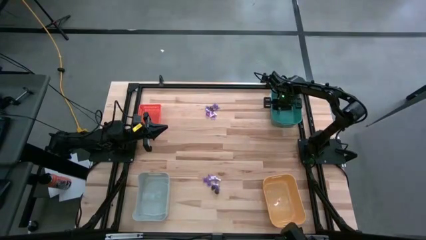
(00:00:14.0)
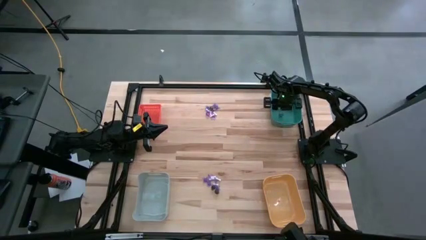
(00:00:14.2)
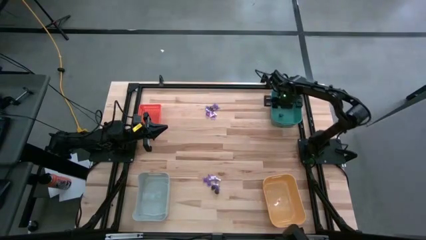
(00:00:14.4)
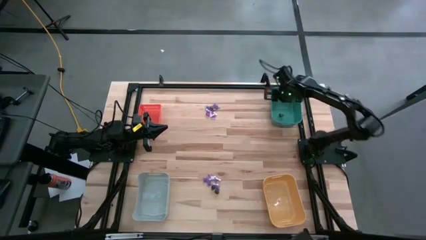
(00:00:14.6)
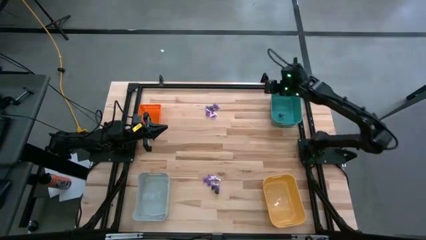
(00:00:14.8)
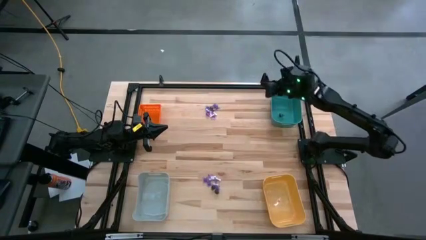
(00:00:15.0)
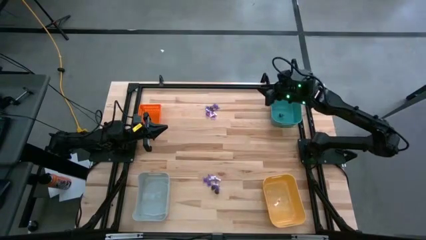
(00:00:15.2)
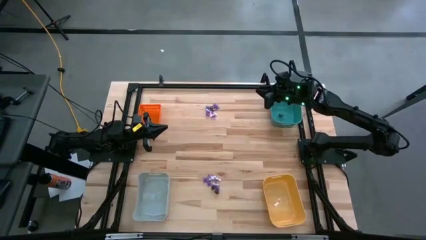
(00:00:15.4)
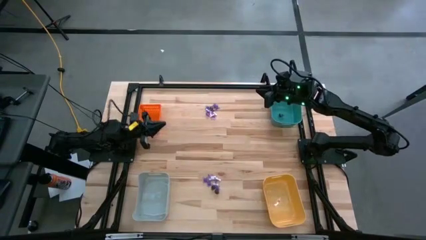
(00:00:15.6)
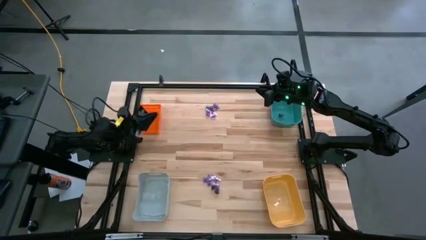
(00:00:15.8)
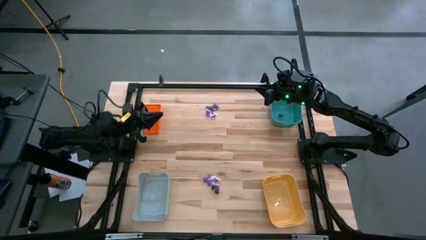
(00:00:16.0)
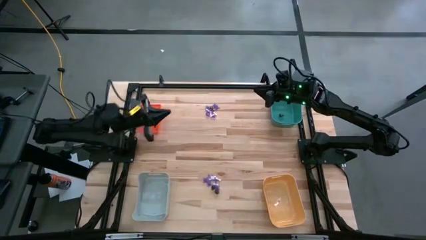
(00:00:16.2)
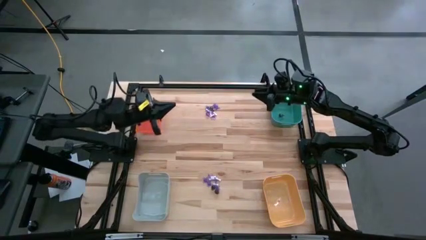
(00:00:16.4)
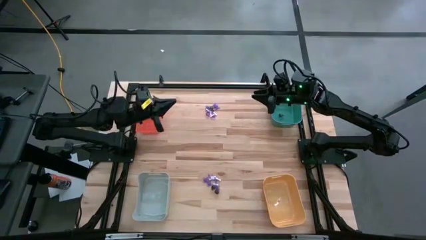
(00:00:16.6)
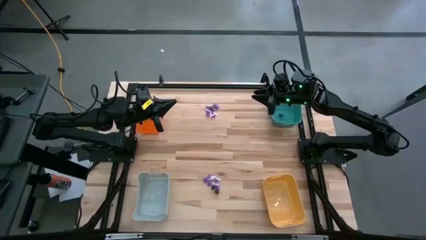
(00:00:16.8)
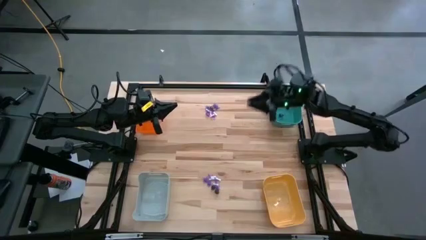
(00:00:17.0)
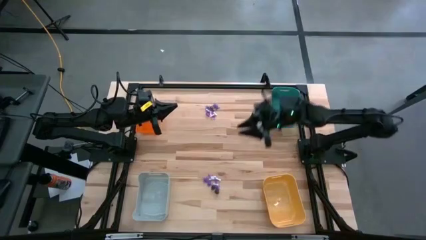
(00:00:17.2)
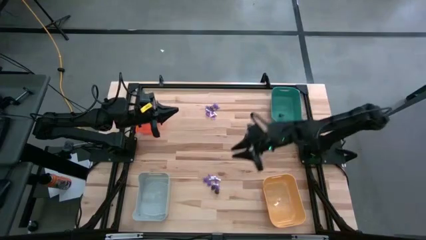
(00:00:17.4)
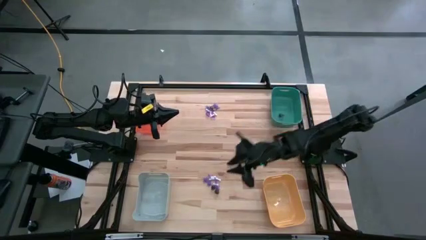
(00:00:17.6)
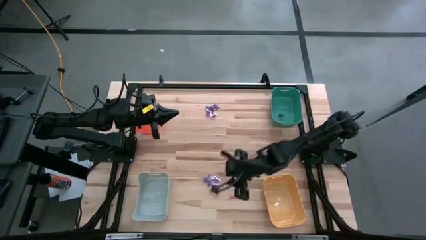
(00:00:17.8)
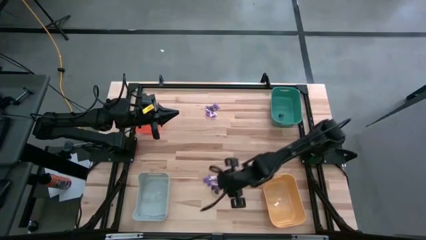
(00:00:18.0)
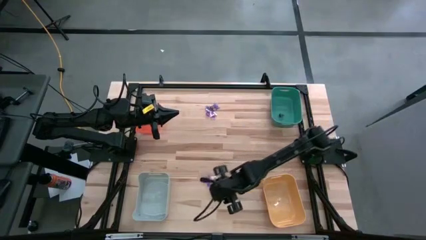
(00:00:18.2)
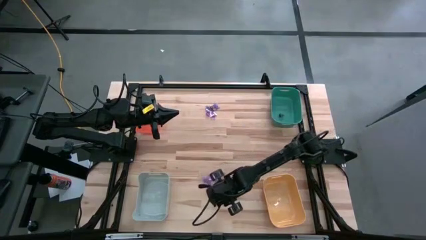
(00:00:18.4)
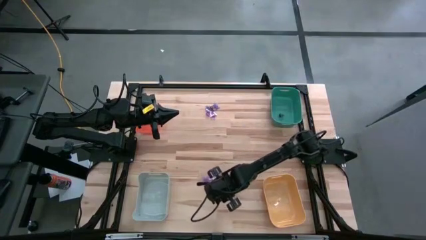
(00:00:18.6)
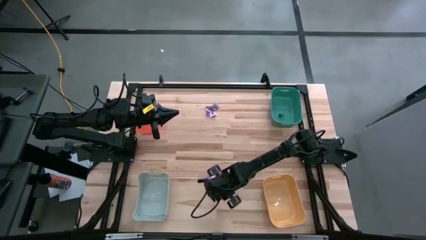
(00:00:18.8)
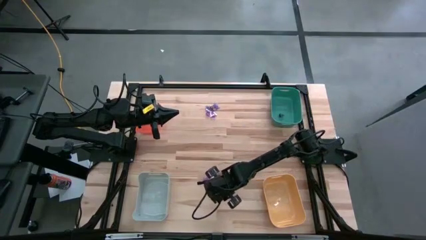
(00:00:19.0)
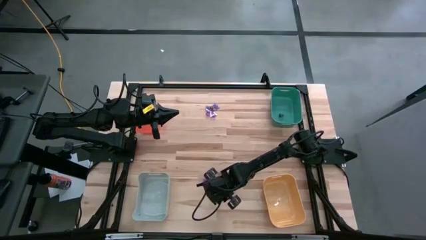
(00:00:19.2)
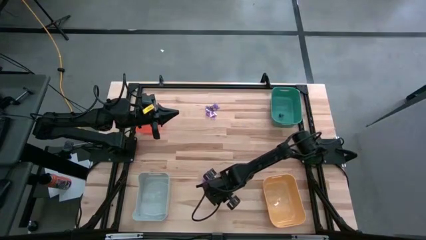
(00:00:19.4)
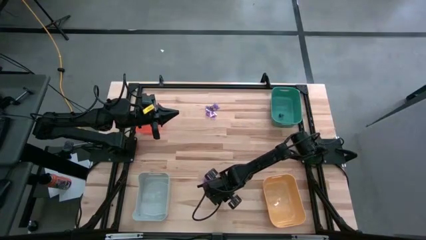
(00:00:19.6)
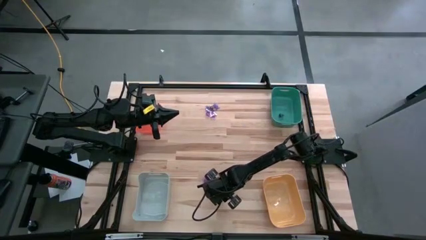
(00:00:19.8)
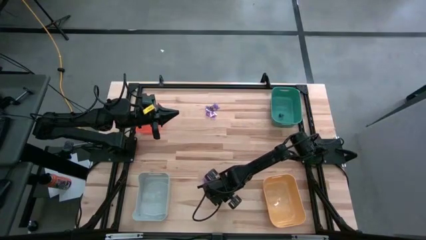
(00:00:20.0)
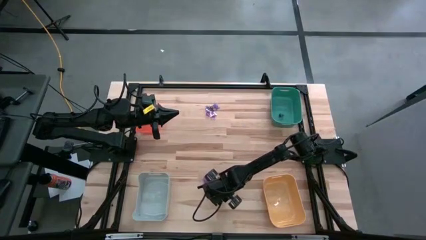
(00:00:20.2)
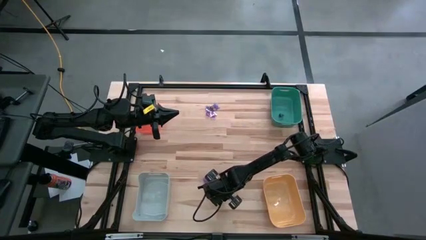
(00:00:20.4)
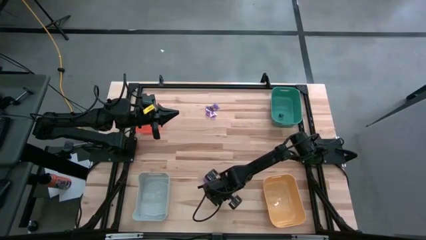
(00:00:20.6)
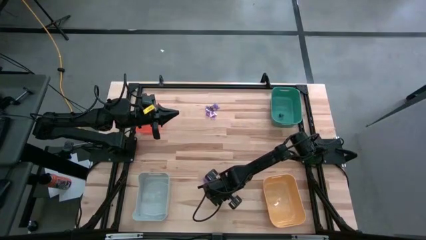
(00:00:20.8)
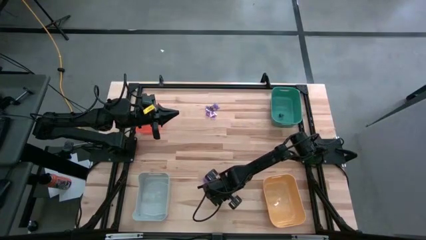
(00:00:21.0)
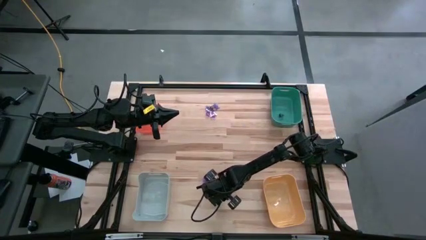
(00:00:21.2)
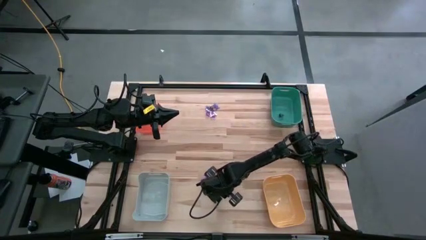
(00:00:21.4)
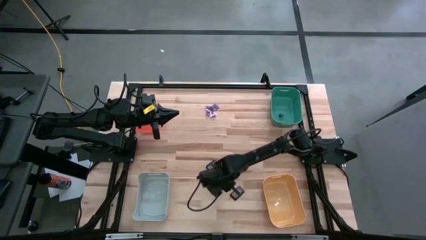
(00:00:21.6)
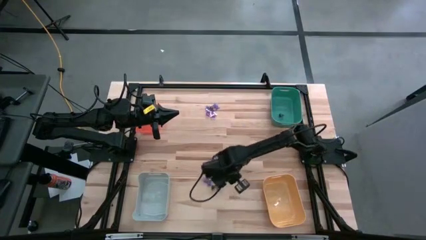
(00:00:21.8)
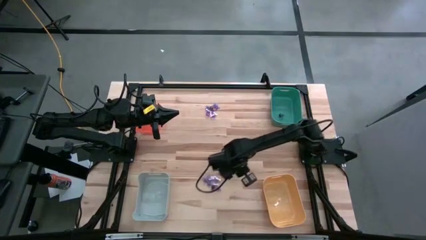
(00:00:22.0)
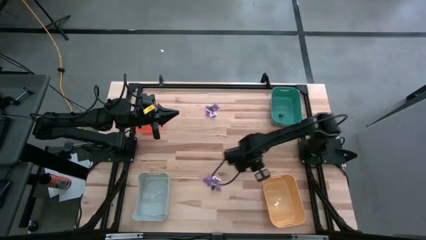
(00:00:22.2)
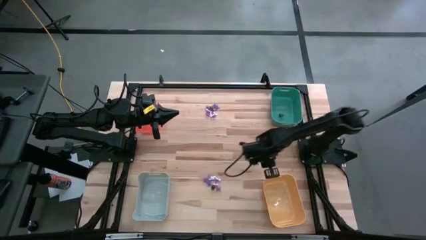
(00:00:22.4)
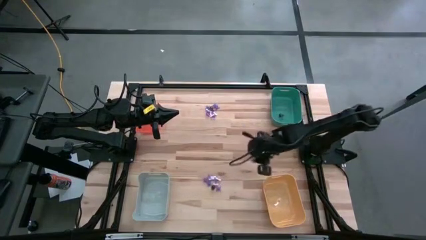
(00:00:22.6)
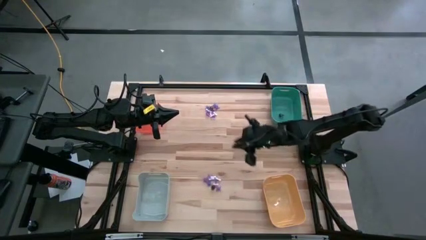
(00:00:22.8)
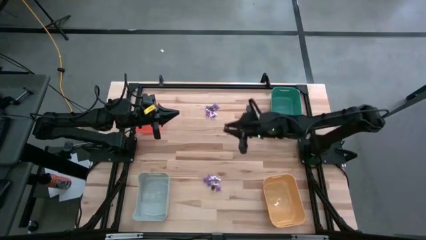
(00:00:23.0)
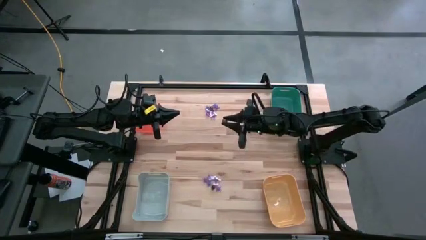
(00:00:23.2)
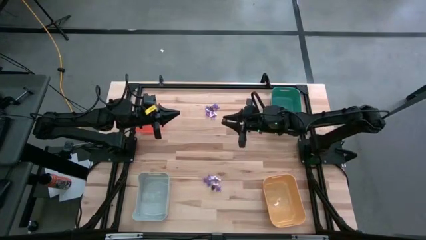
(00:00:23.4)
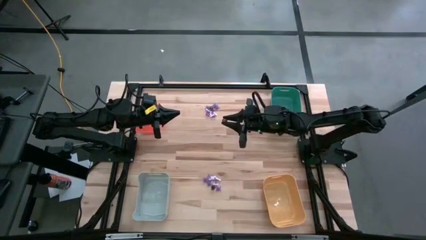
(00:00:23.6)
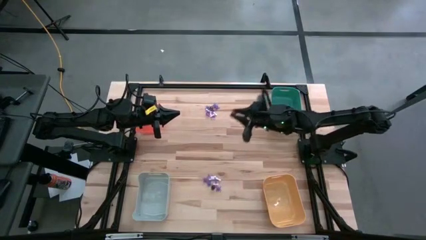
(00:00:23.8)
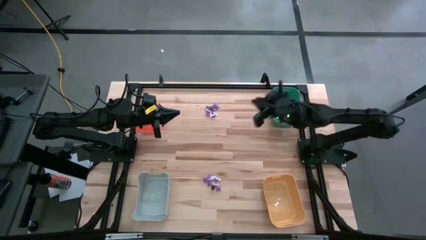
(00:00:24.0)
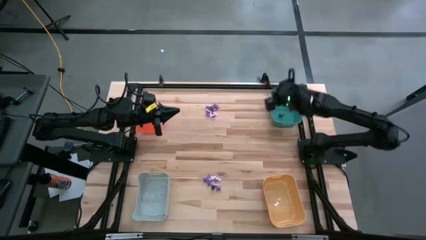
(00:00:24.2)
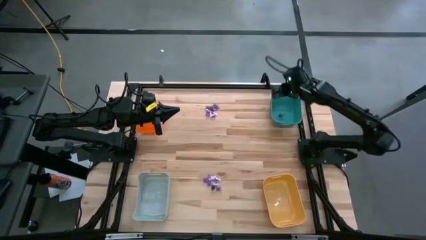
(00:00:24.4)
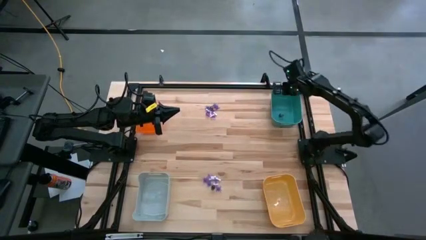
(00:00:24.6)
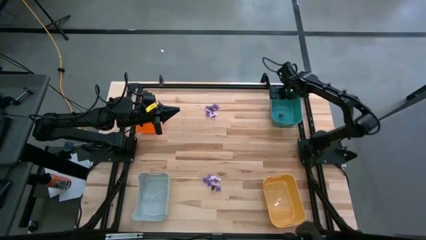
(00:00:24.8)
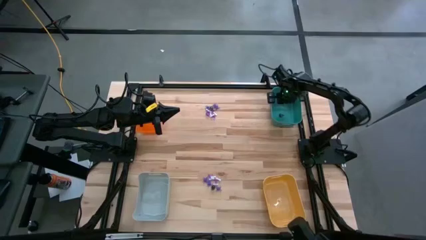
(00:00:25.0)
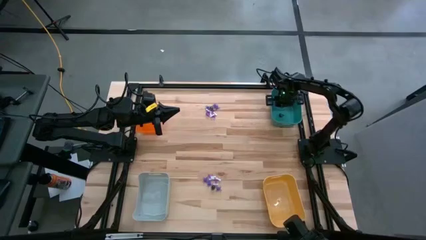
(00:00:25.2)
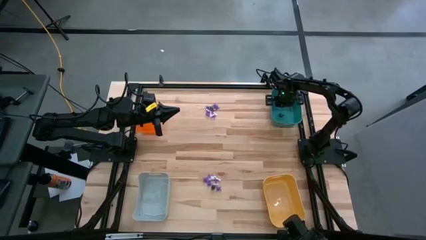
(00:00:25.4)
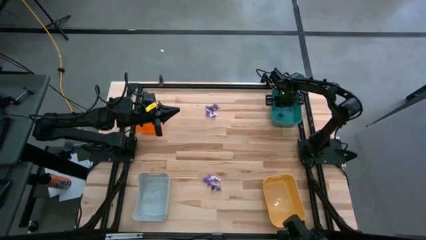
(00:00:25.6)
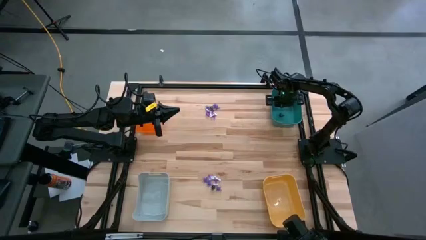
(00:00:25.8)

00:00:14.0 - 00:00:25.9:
Task: Sort Halloween decoration
Put the black skull toy into the green bin
